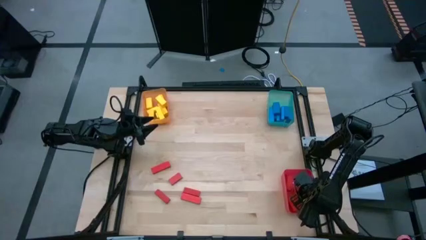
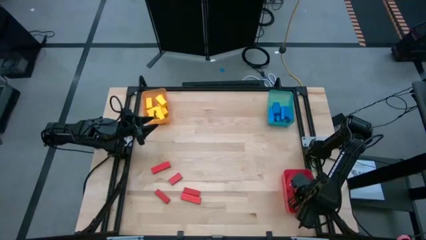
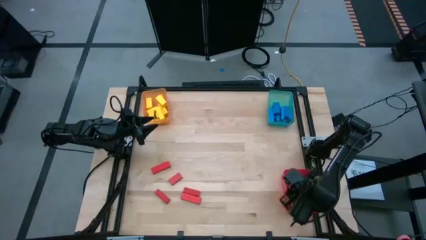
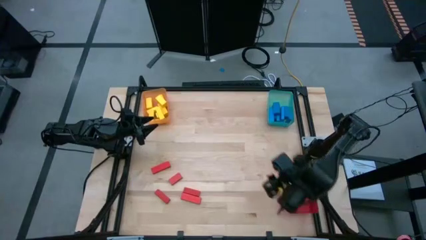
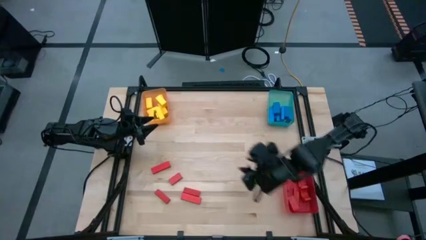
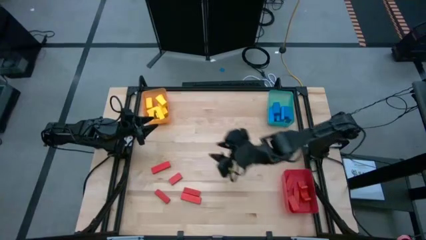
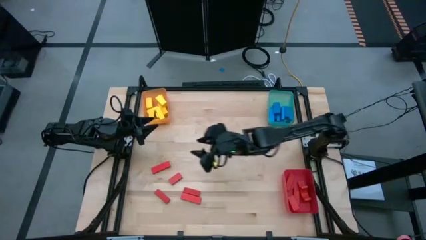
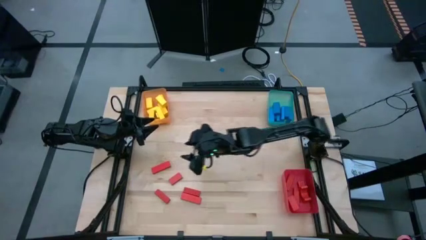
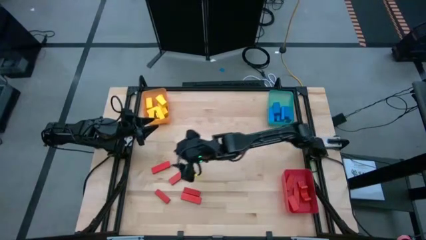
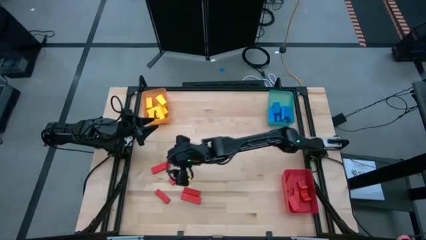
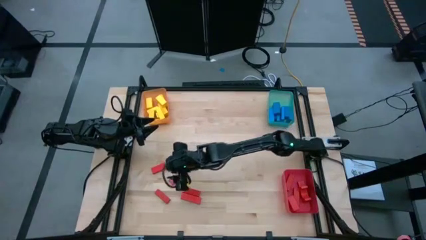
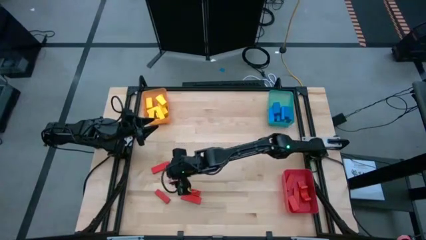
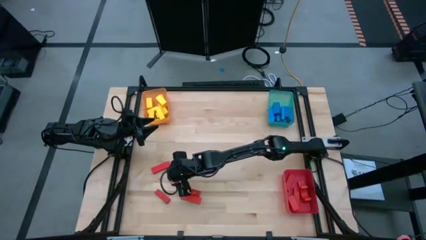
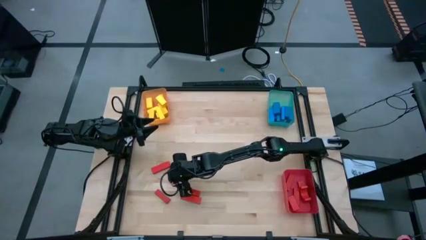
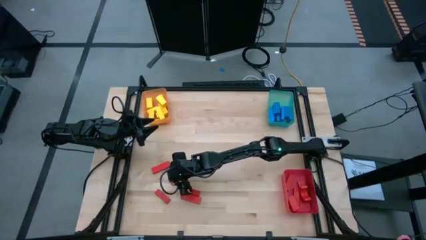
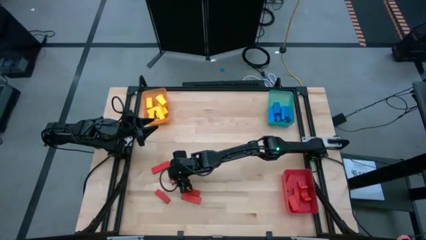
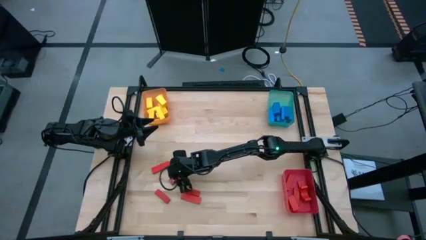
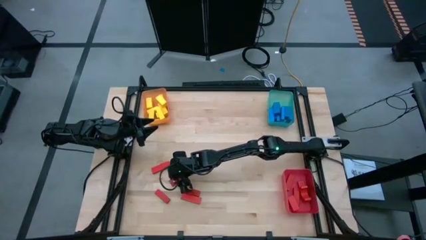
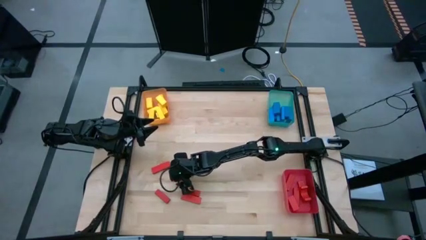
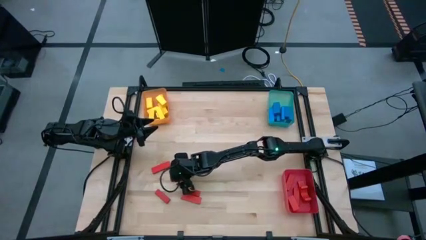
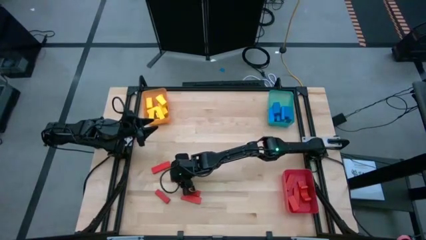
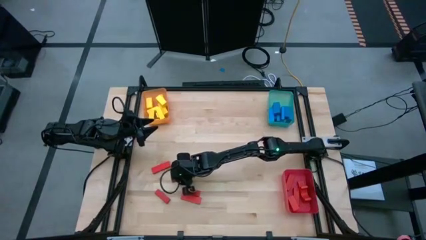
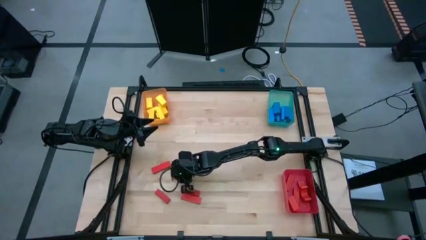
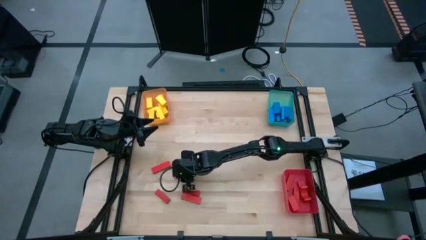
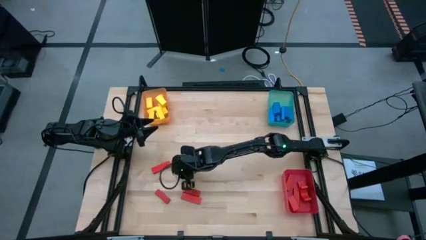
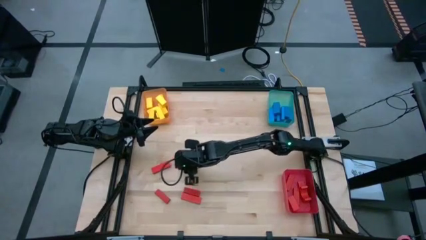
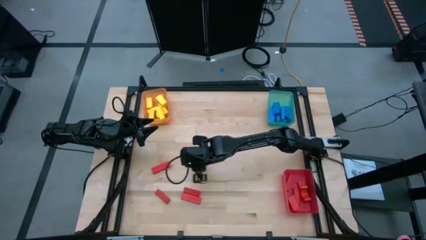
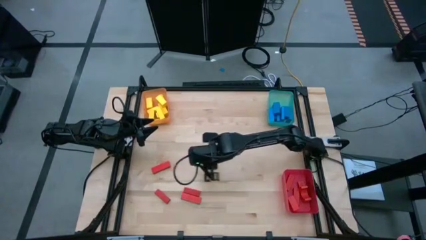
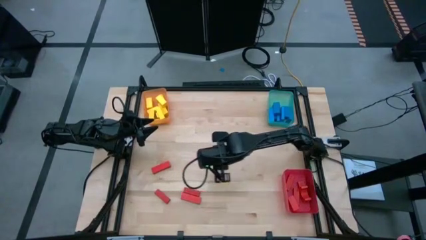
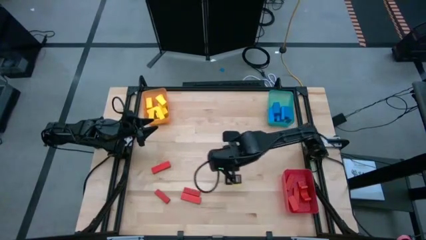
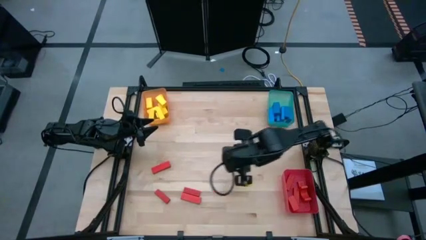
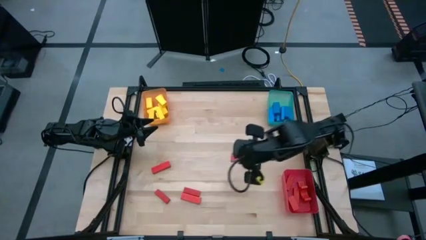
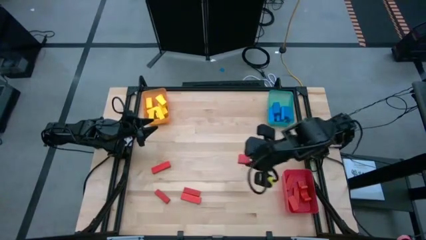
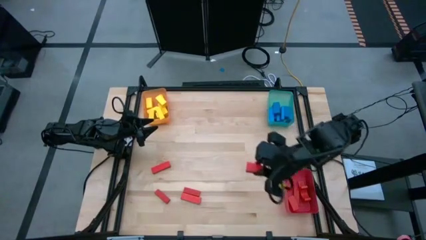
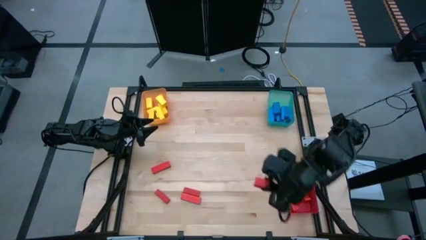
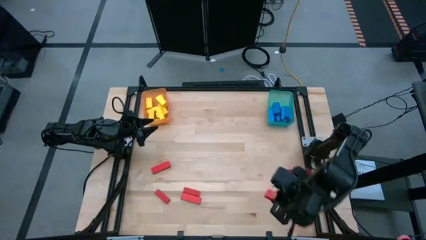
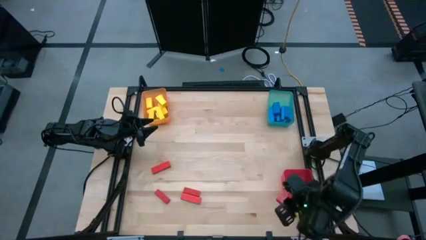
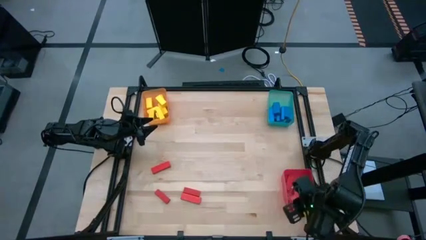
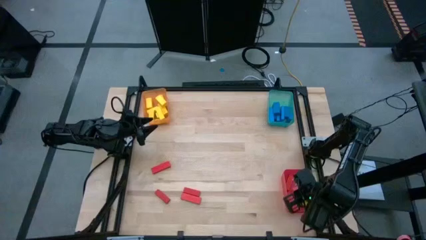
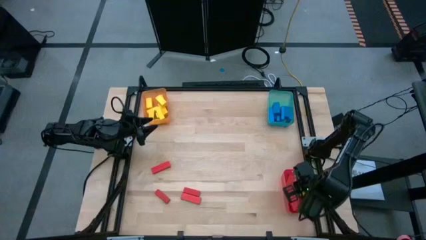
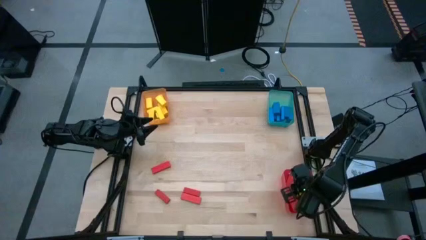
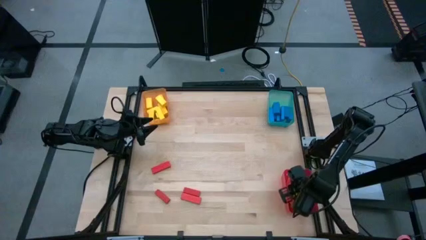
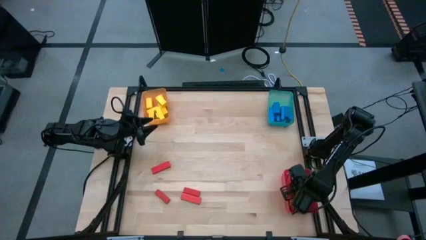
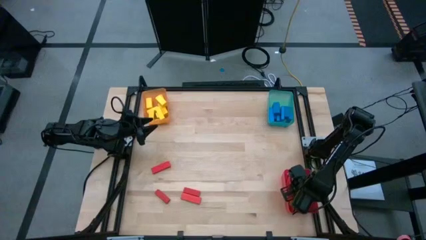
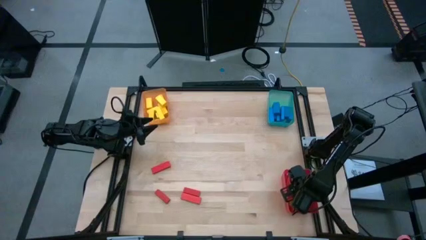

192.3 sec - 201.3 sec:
Task: Sort blocks
Put the red block into the red bin
